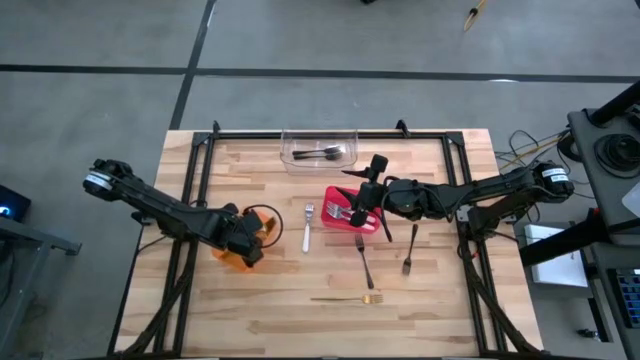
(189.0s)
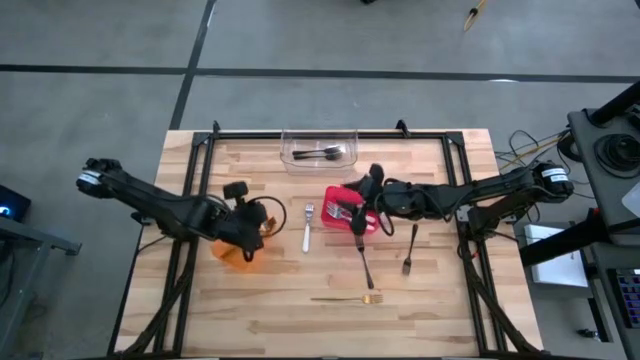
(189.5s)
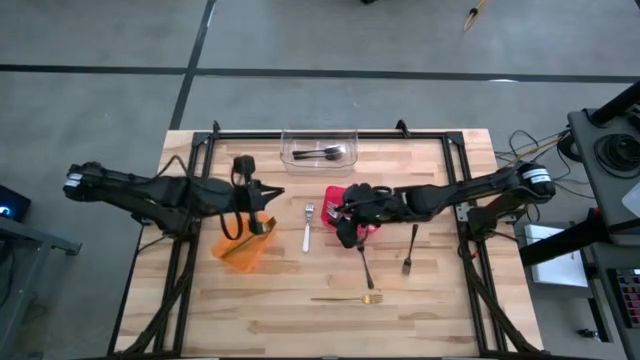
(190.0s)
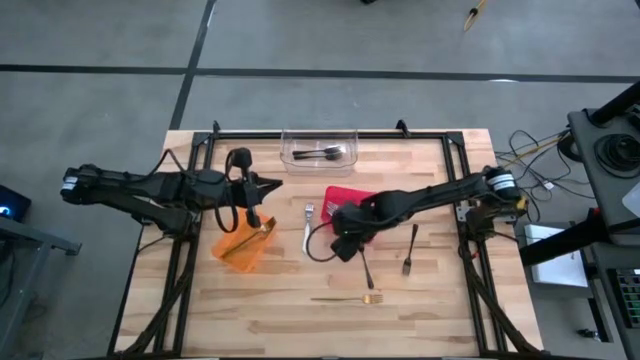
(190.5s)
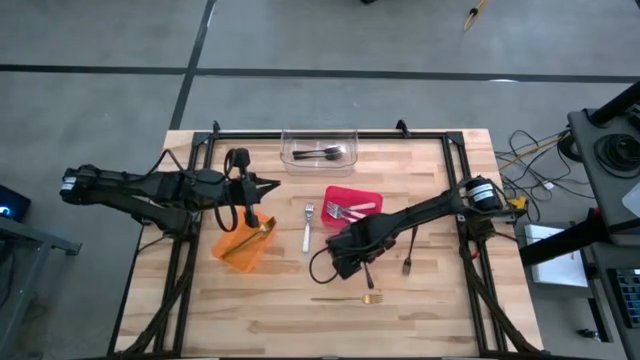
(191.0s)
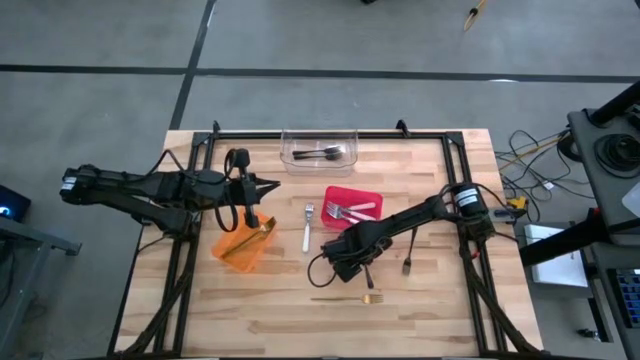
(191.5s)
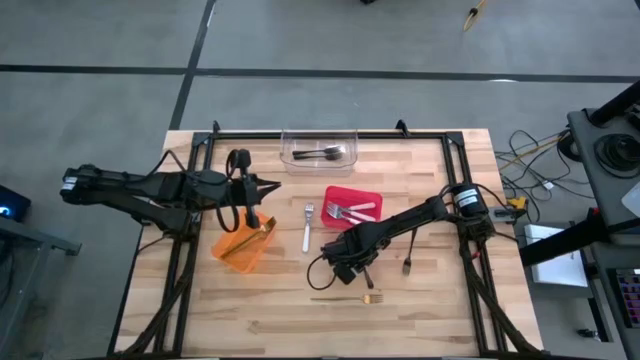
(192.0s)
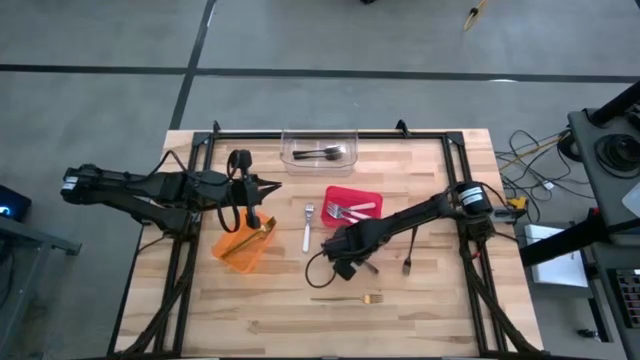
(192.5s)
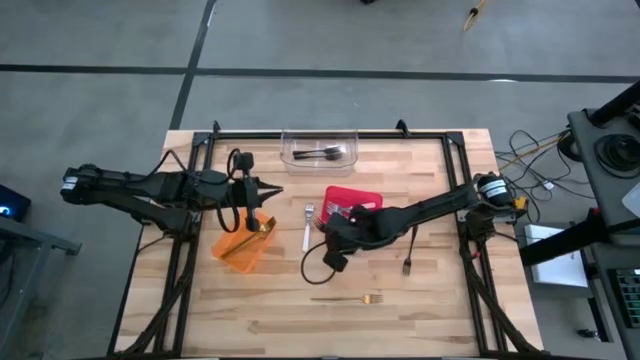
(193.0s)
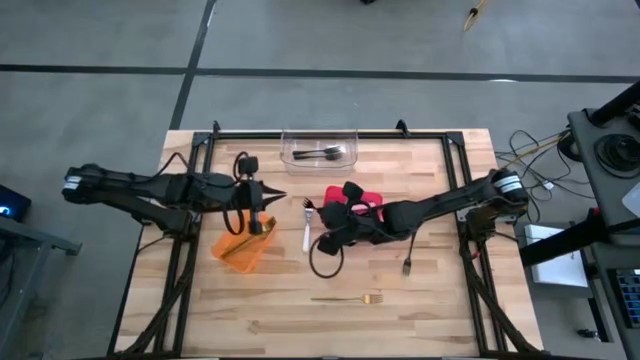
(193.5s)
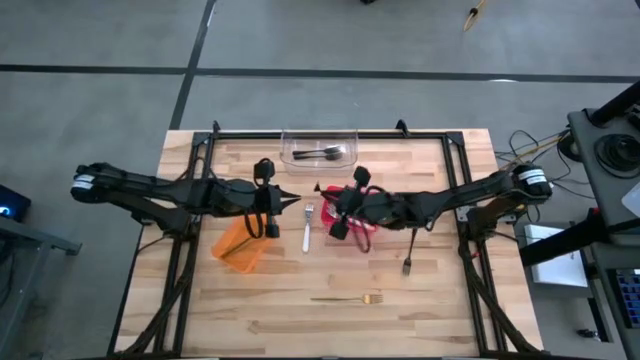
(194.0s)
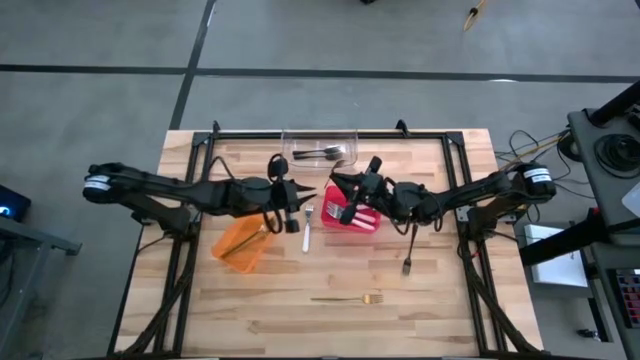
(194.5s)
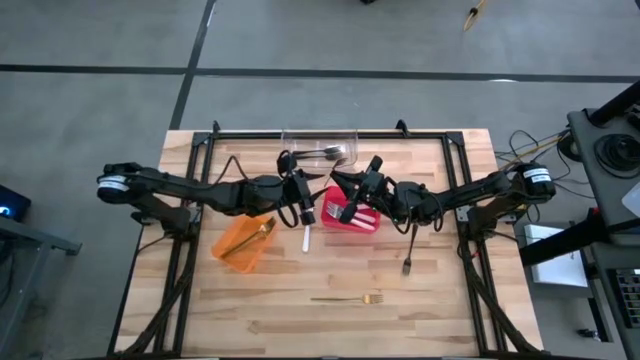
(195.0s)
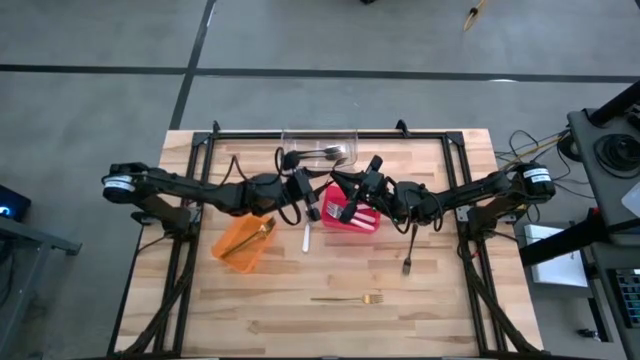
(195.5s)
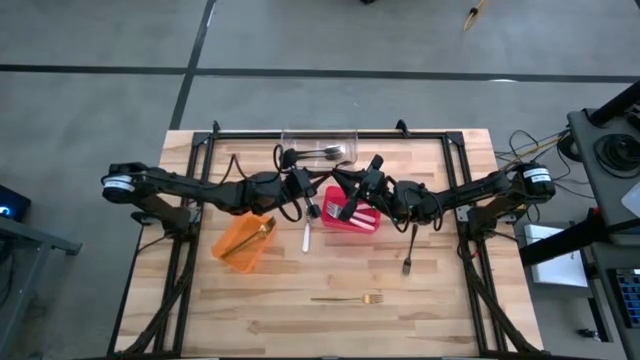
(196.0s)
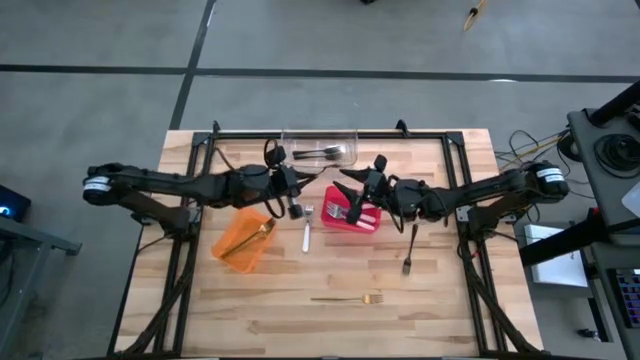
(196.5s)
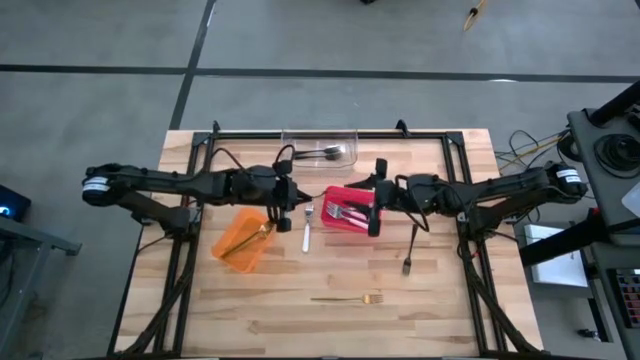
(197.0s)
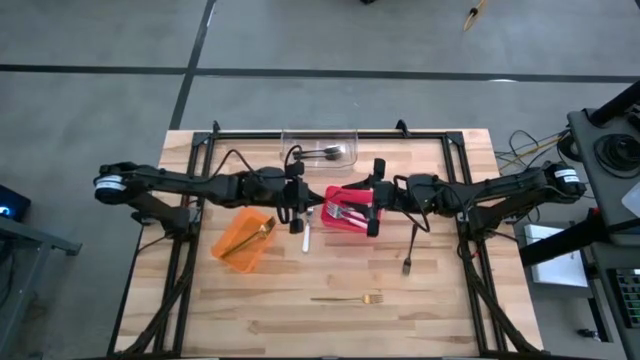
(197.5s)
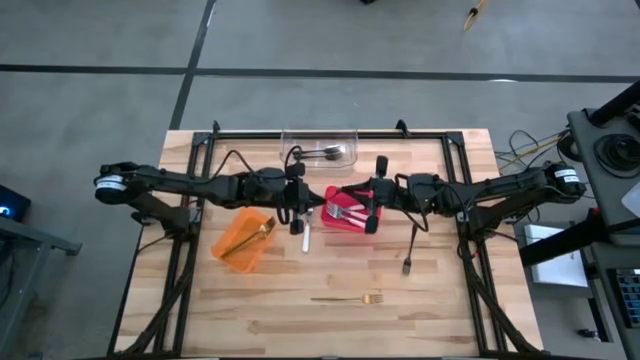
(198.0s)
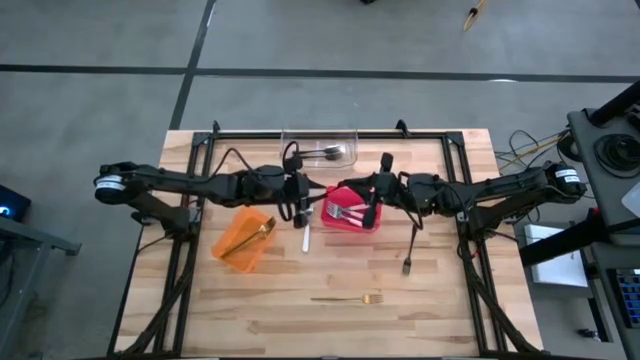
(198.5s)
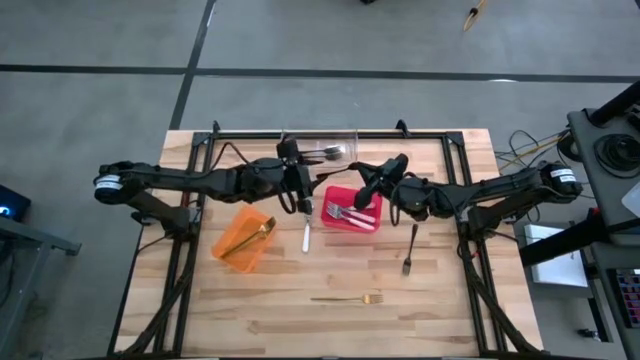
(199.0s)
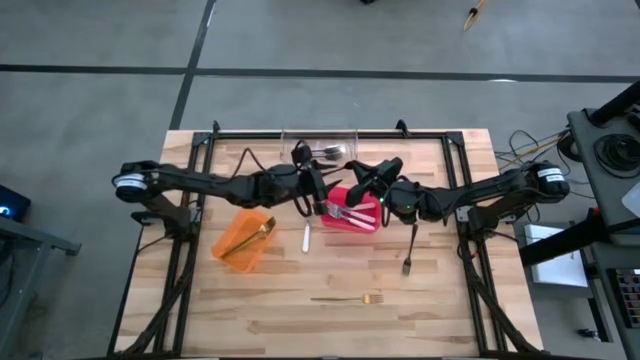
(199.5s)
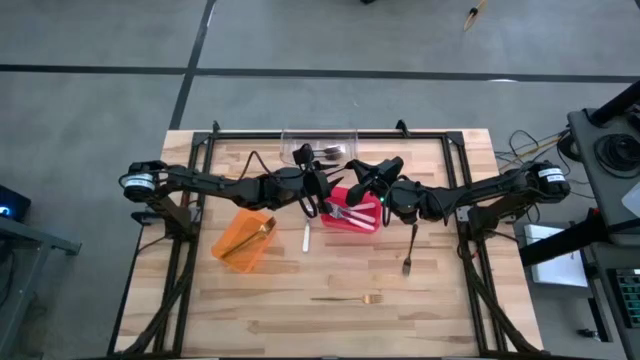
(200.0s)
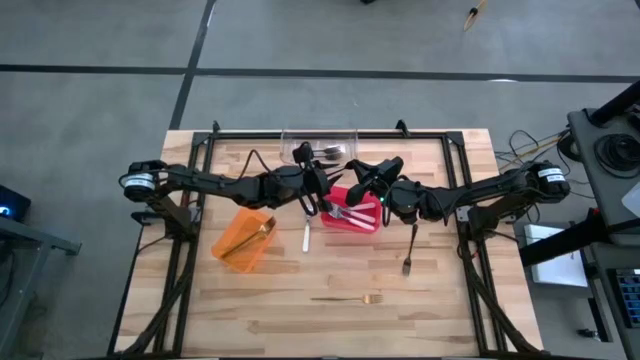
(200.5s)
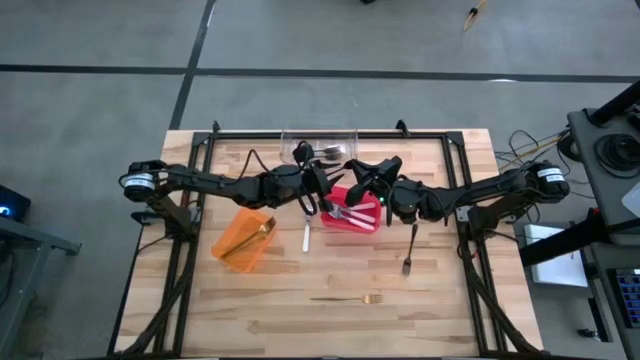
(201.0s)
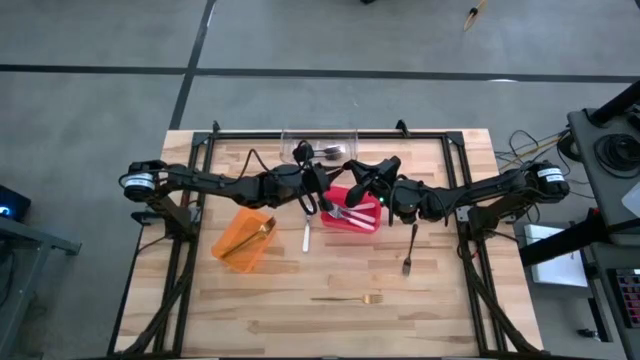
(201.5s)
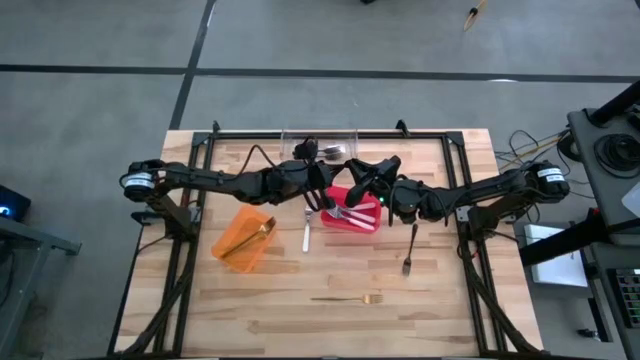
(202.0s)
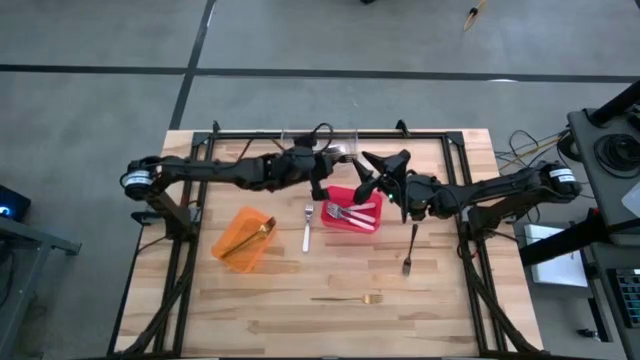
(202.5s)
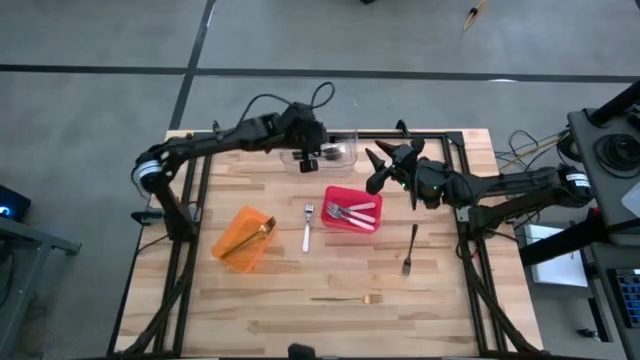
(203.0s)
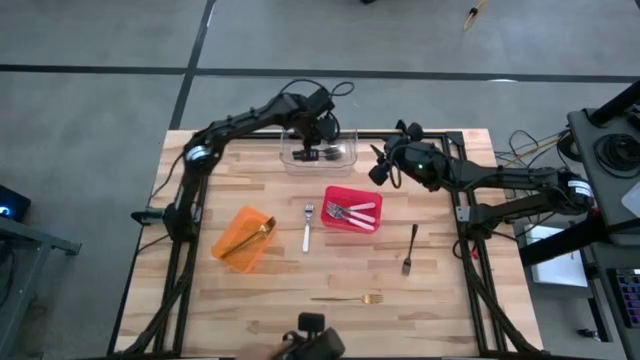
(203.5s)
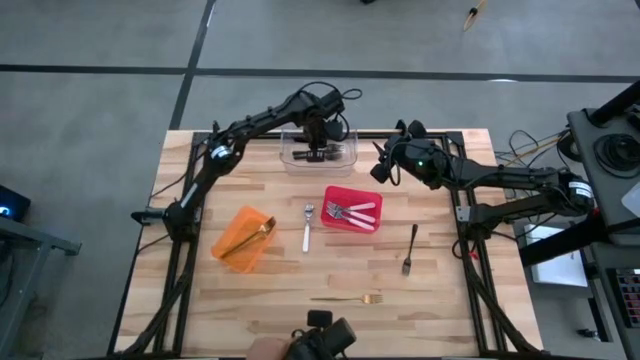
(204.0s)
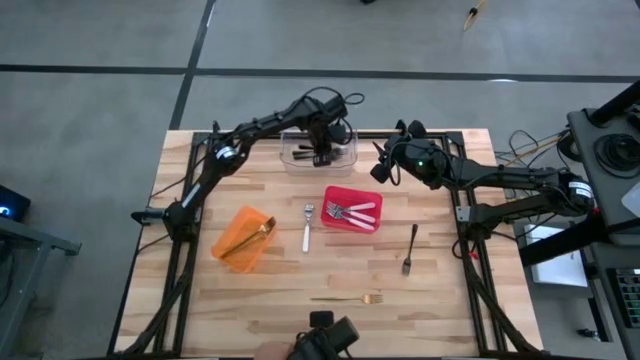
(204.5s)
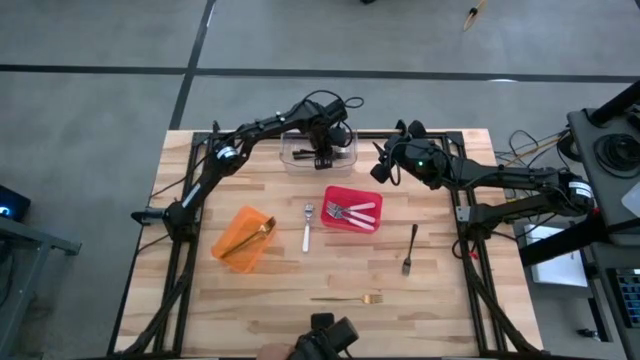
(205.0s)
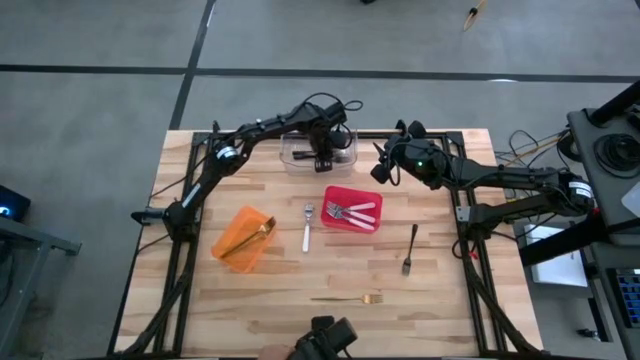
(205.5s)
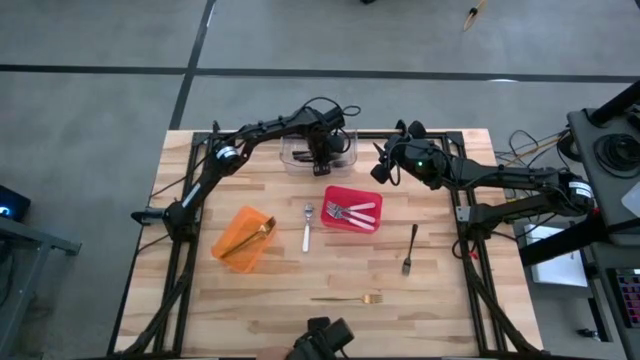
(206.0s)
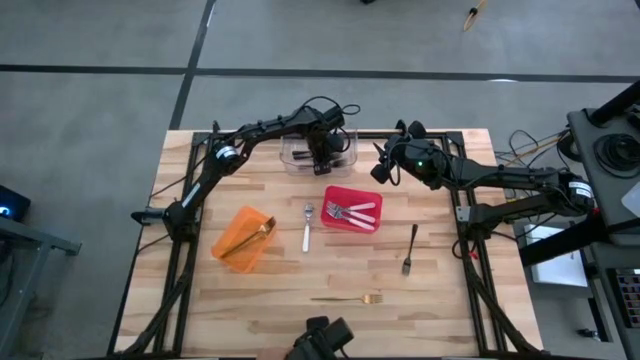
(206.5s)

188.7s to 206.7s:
Task: Sort silverware by color (type)
Put the black fork into the transparent bin

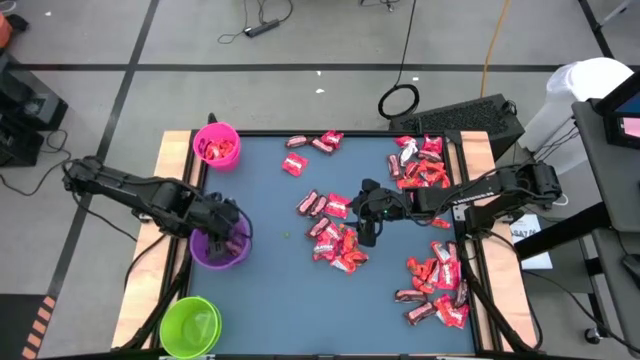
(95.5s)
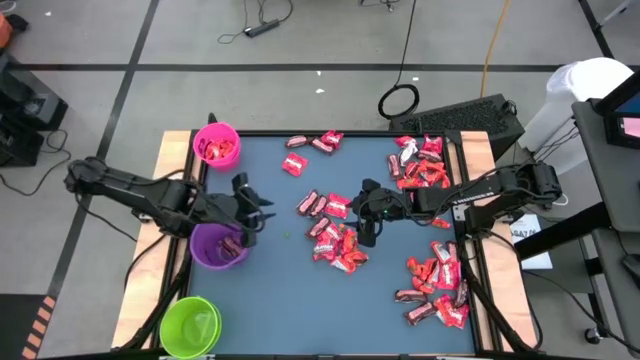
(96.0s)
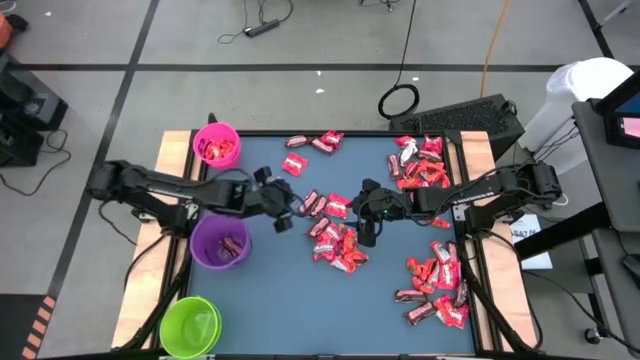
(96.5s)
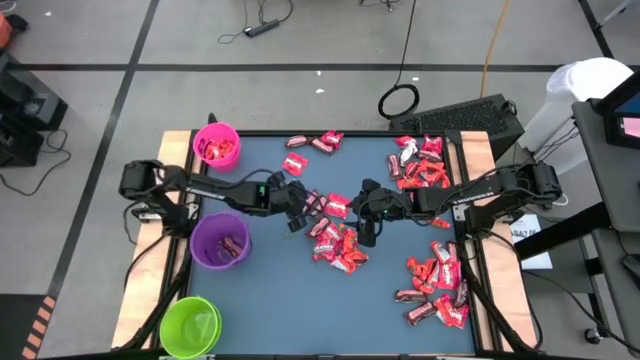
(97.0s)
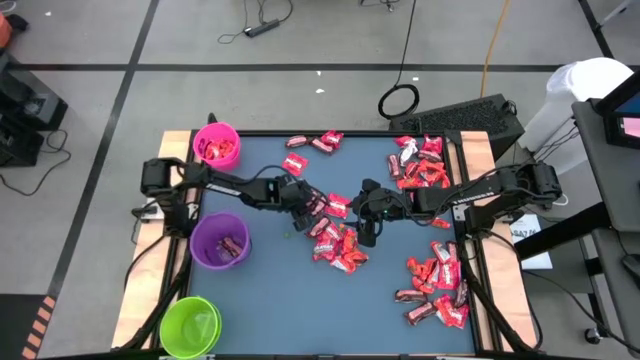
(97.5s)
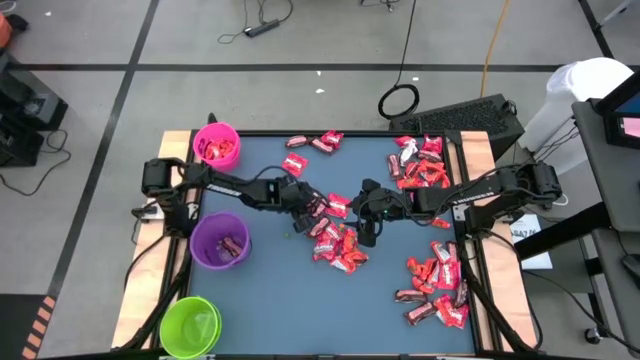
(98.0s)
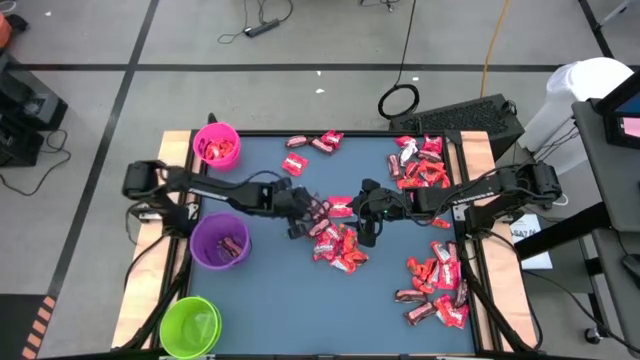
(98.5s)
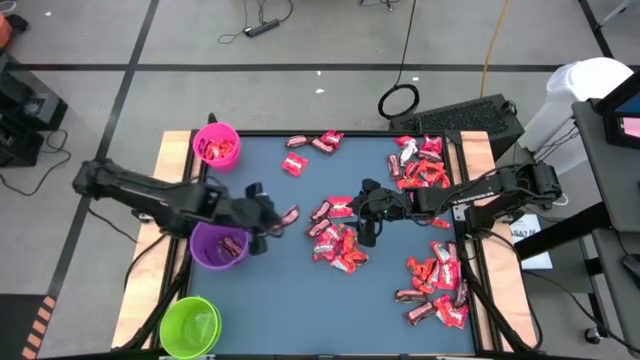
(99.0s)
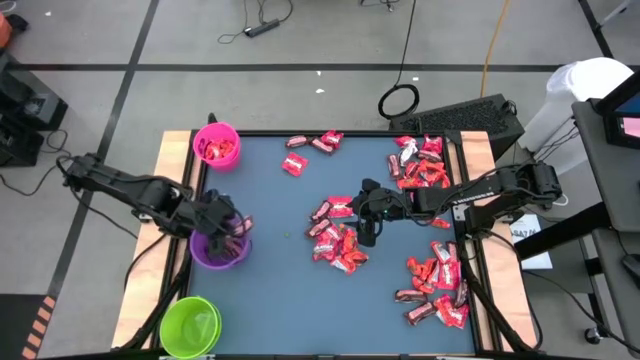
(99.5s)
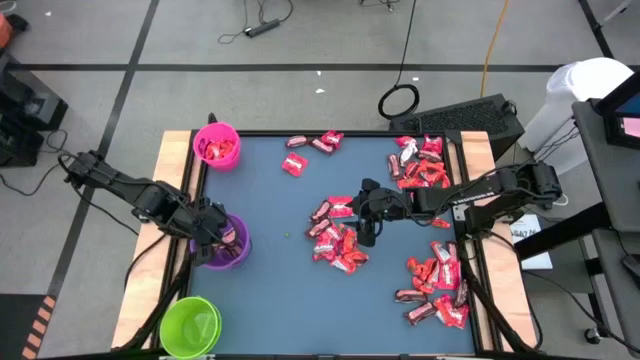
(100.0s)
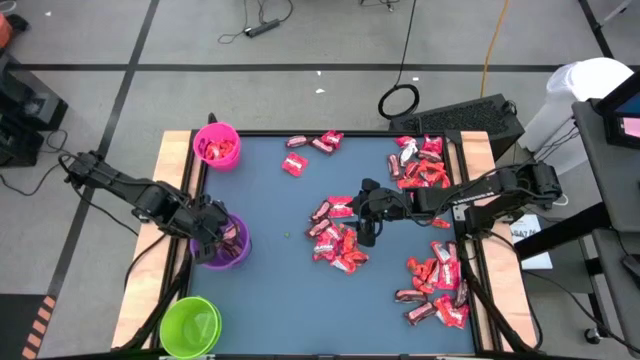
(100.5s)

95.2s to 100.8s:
Task: Organize candy in baskets
Put the brown chocolate into the violet bucket
